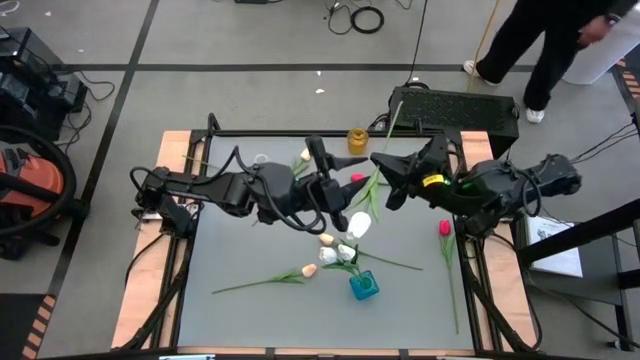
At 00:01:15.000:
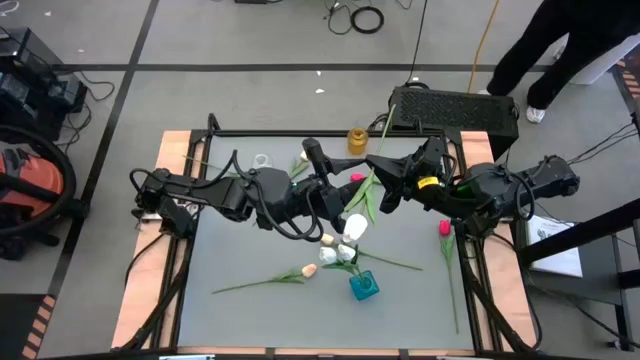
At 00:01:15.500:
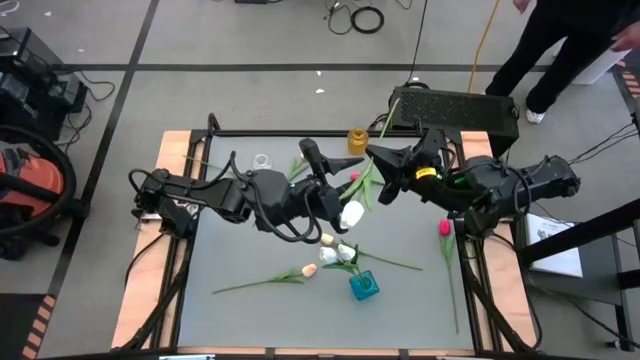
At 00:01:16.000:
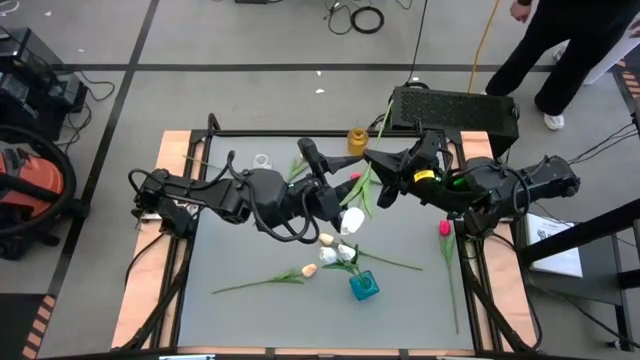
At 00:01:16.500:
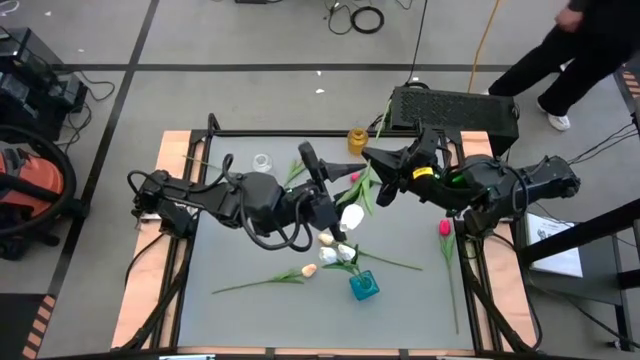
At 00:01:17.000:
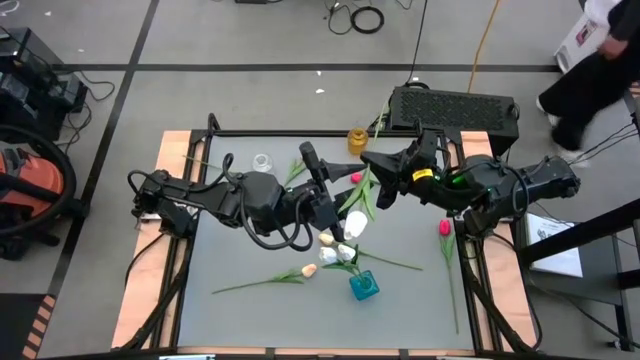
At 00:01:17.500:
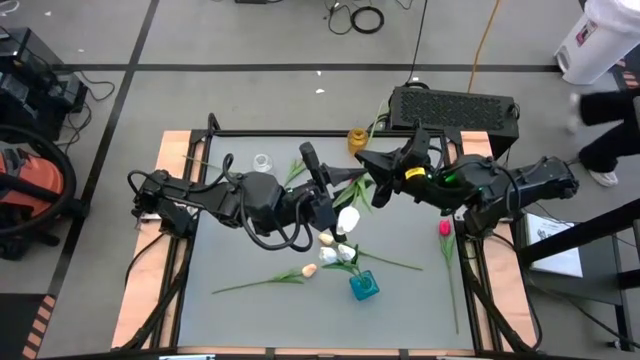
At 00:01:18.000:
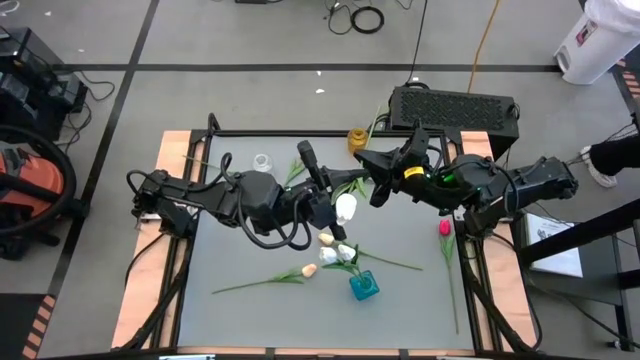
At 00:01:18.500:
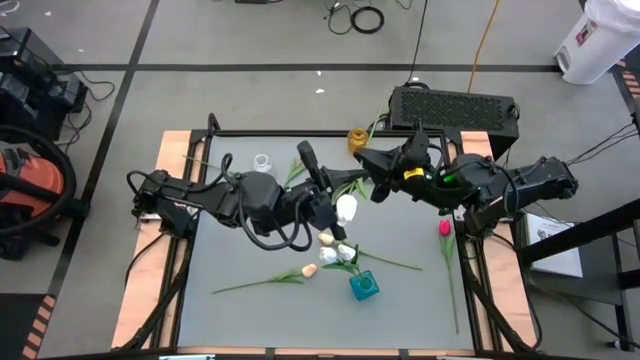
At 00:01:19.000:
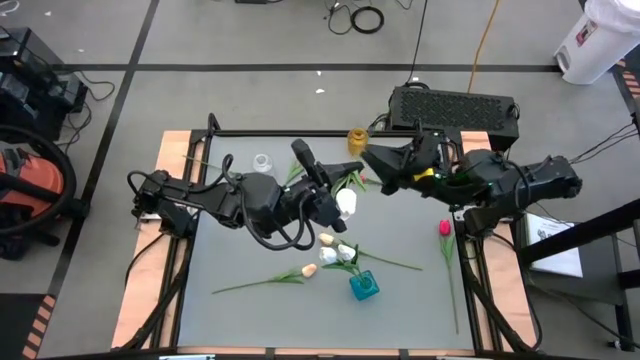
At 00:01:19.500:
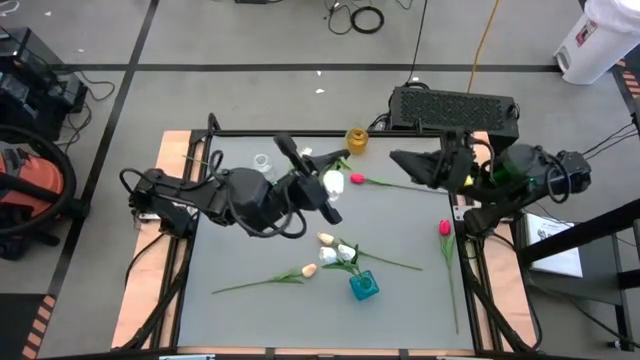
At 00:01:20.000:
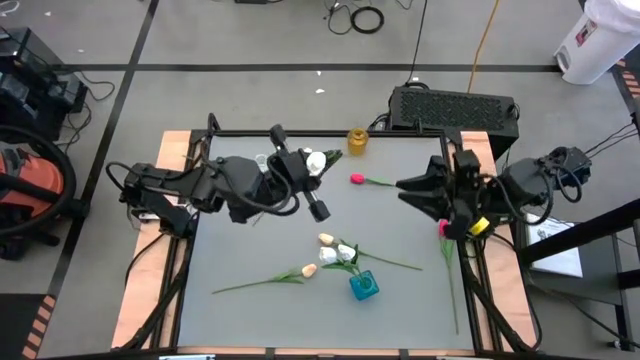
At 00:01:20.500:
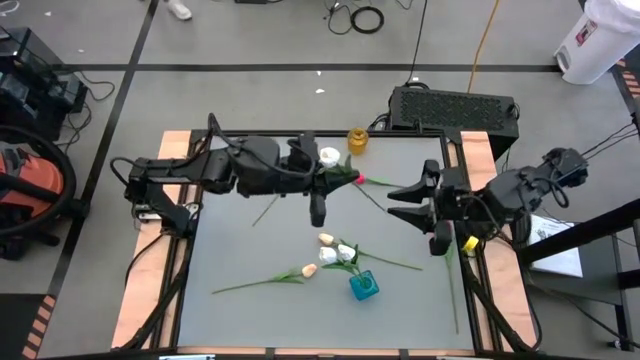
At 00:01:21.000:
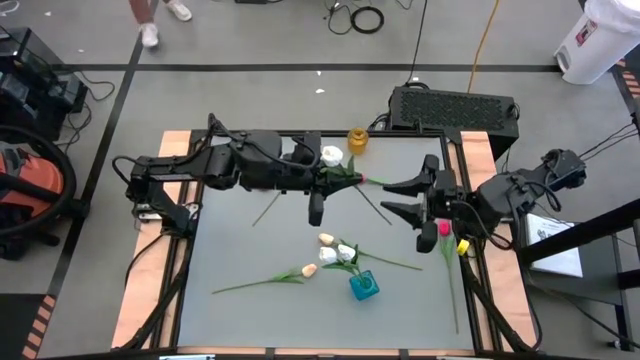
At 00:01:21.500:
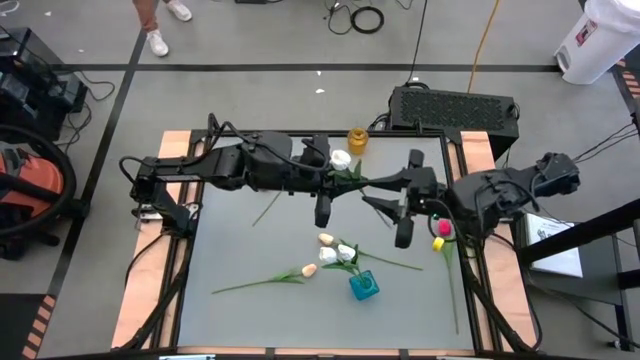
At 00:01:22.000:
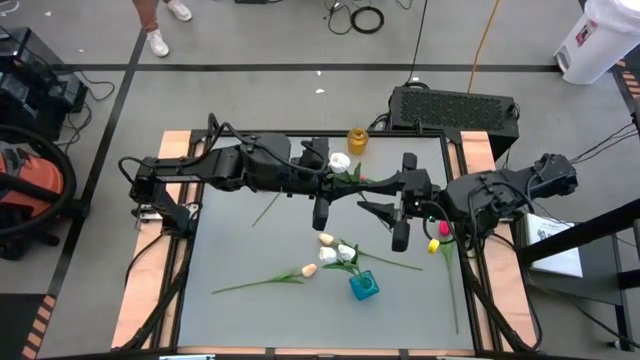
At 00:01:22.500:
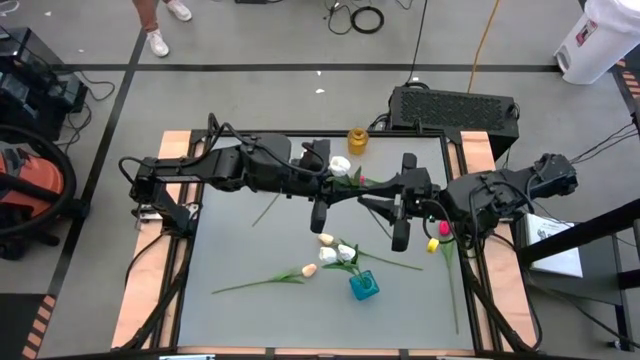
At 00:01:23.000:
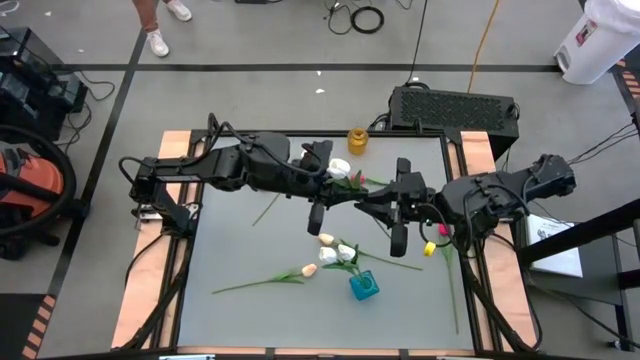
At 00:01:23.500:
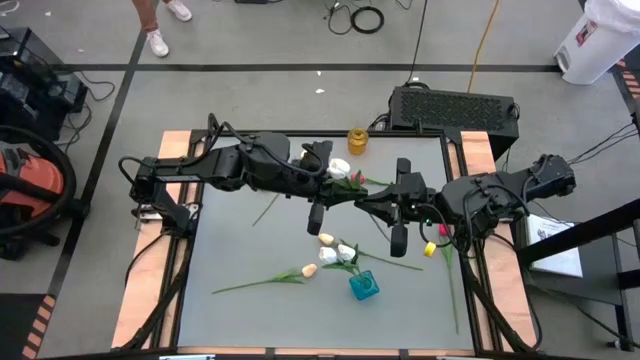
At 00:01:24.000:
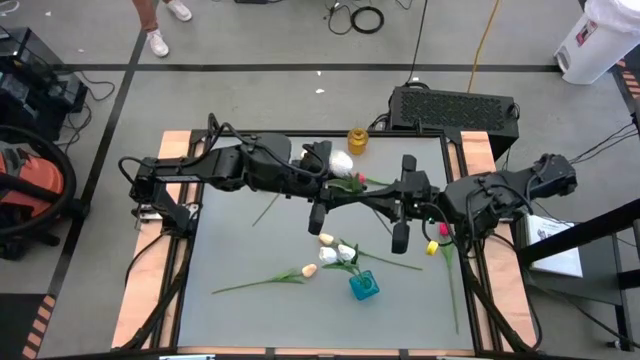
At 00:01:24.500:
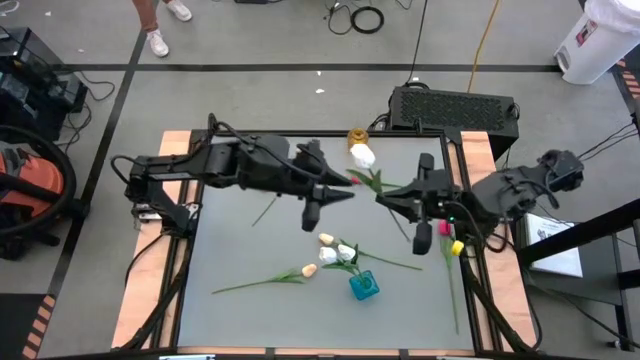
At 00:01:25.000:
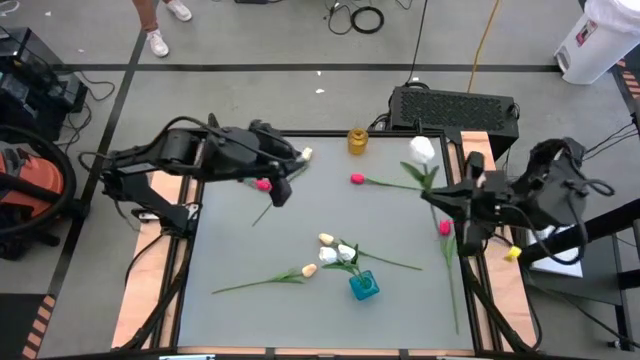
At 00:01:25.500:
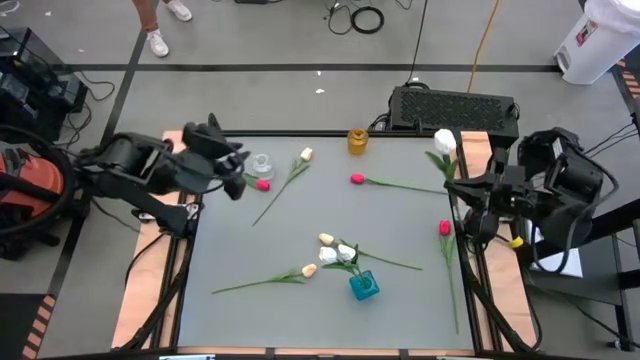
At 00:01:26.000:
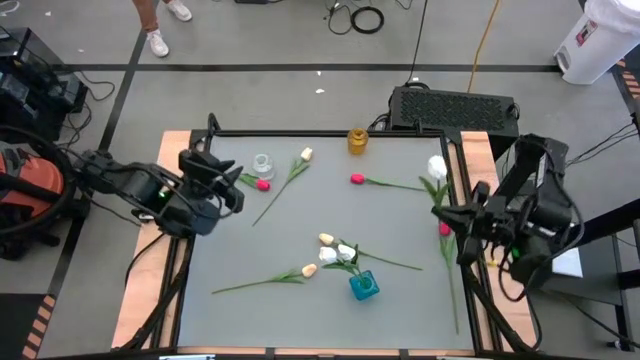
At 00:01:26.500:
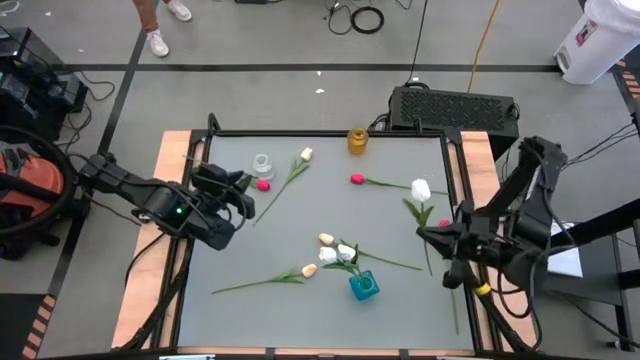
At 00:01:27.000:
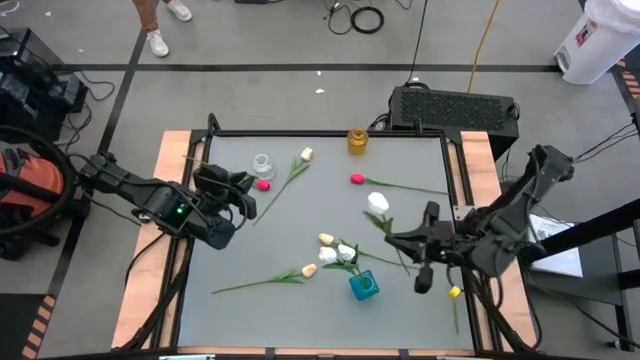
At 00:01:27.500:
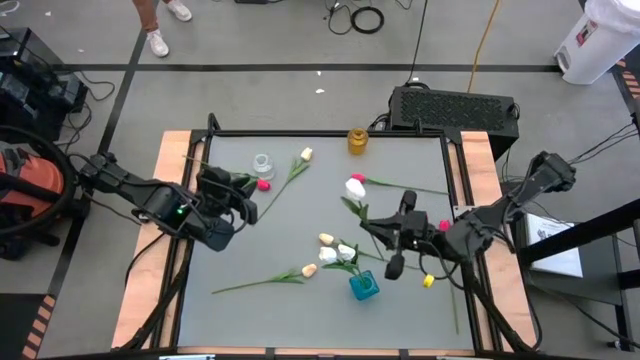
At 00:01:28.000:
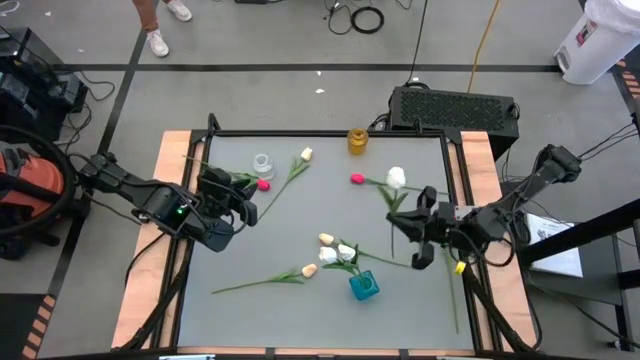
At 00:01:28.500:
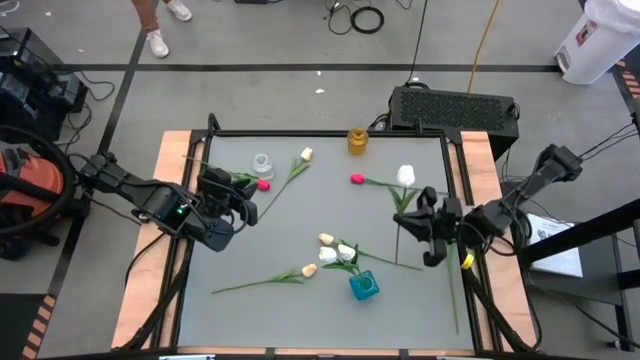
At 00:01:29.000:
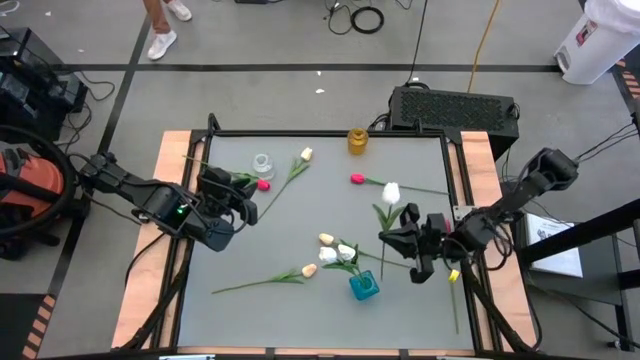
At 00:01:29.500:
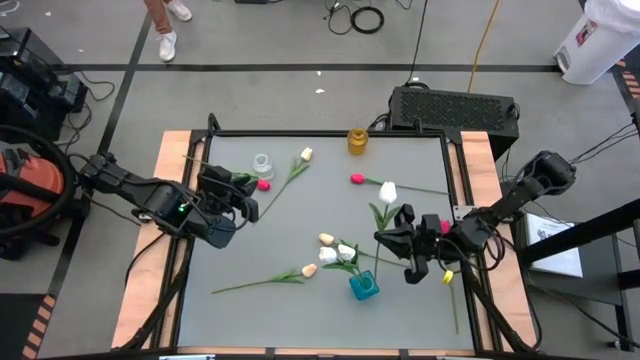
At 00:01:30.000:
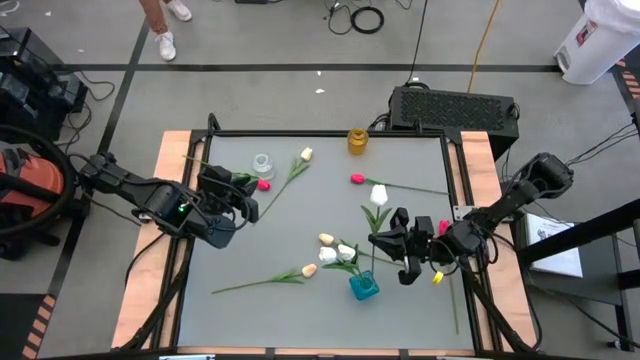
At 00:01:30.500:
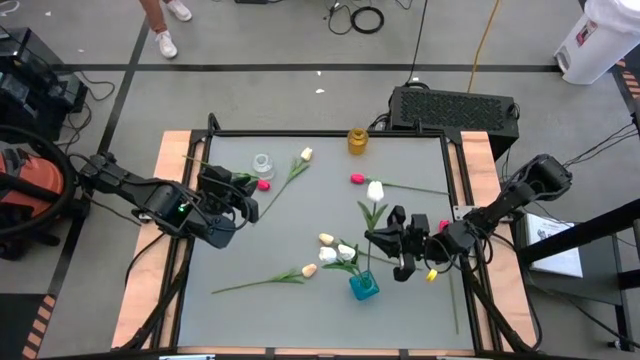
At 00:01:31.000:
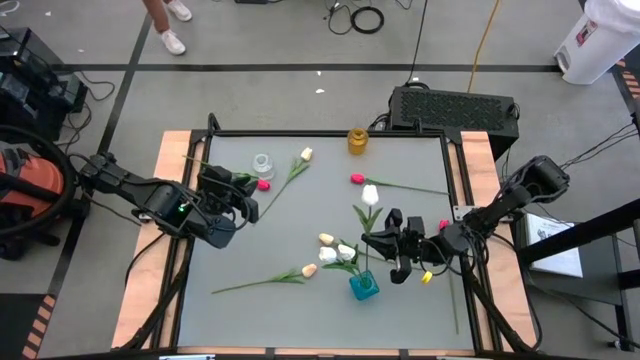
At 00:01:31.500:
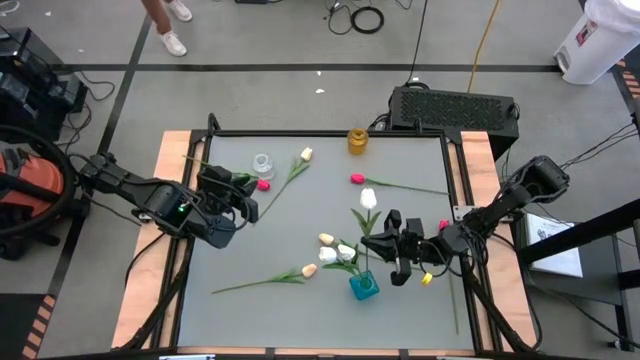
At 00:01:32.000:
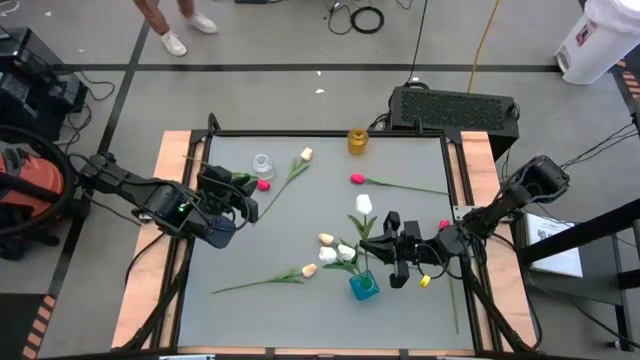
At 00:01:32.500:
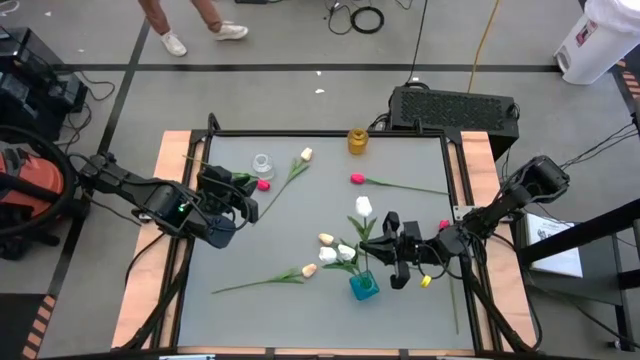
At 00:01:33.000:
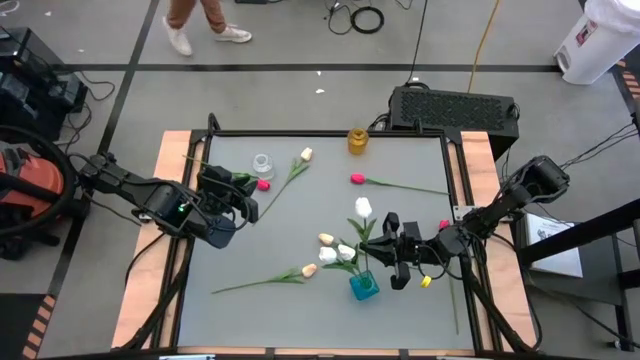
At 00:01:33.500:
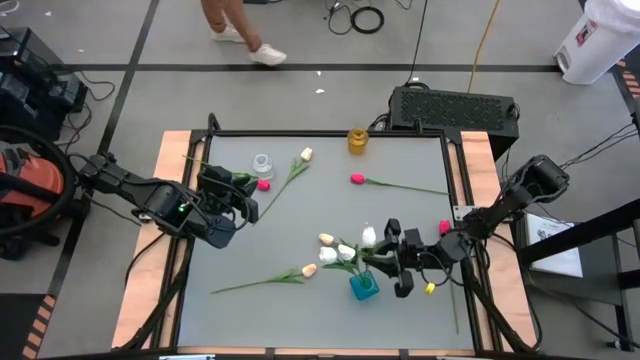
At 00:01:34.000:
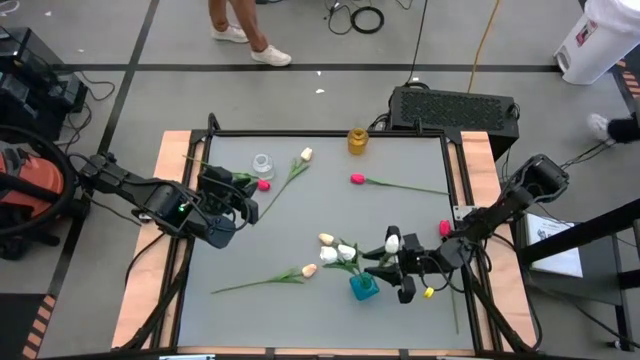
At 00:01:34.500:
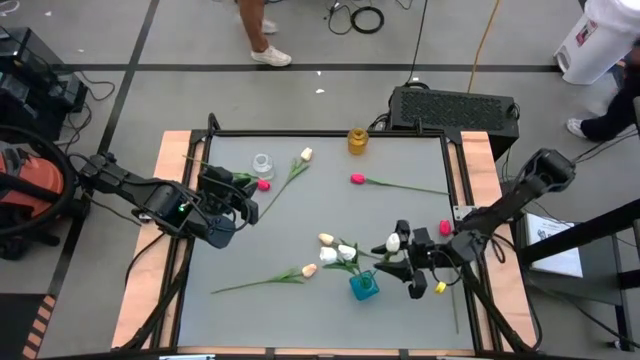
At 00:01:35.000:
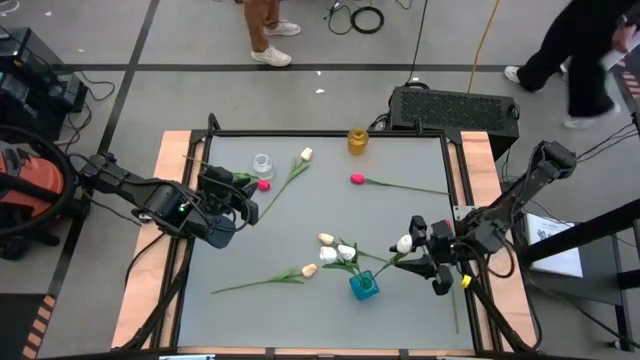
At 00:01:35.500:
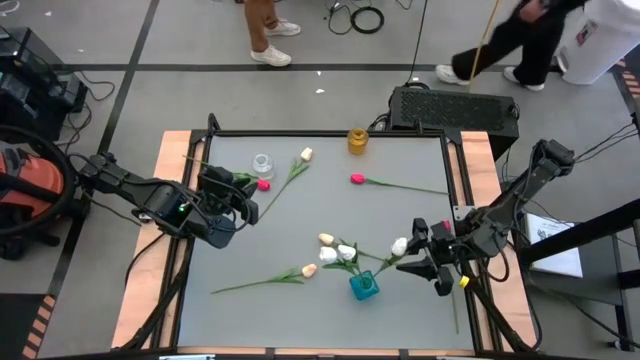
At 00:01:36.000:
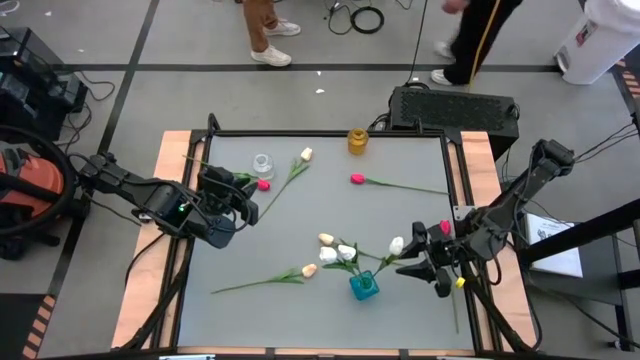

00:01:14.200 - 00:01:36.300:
Task: Sort flowers into vase by color
Put the white tulip into the blue vase
